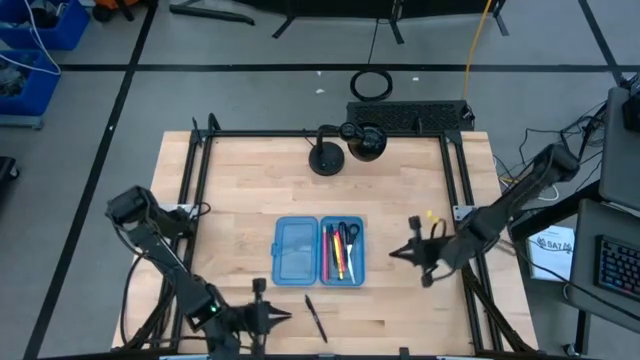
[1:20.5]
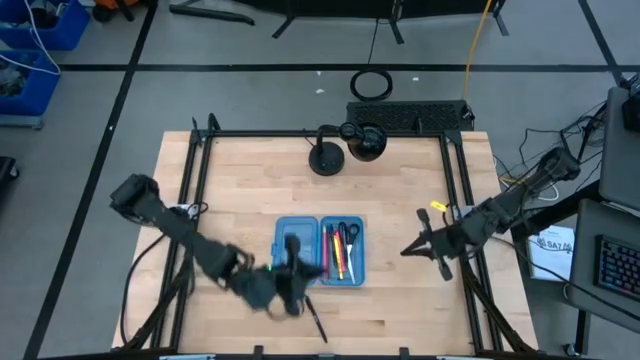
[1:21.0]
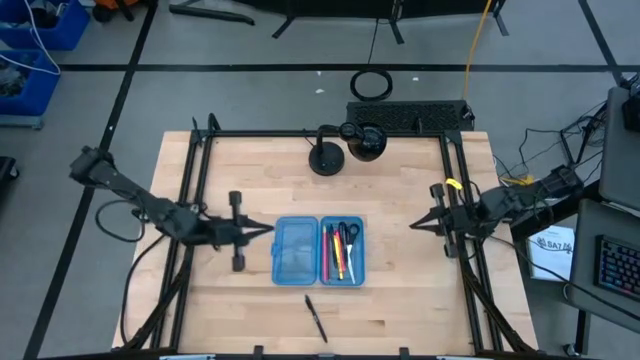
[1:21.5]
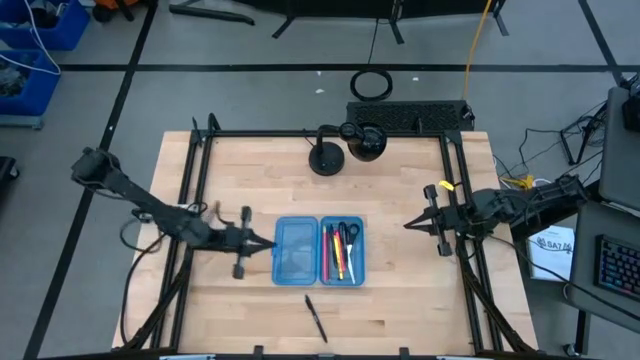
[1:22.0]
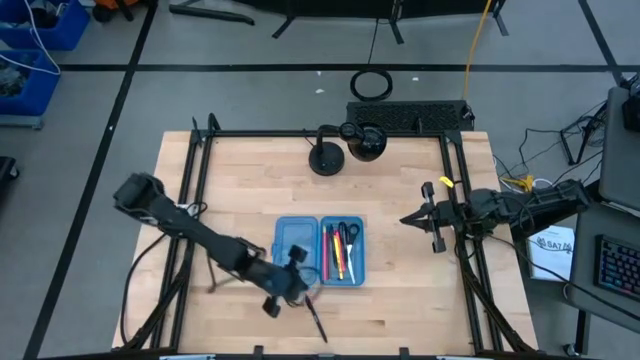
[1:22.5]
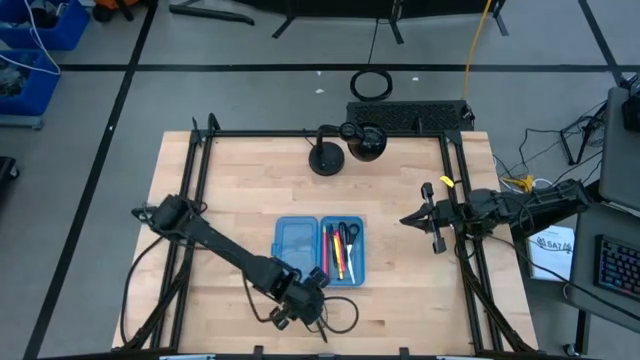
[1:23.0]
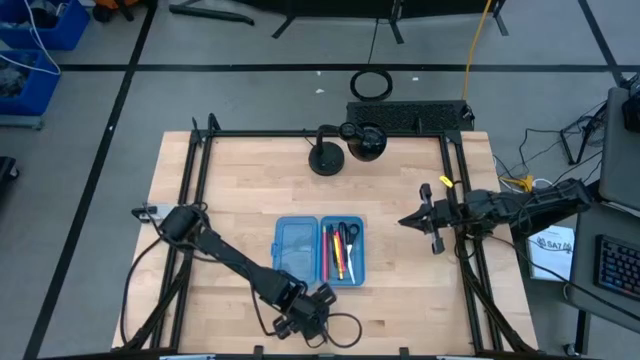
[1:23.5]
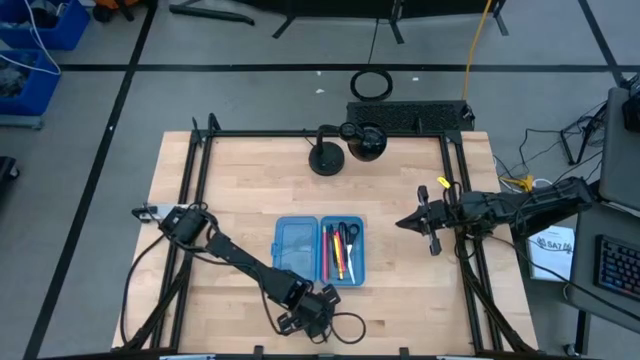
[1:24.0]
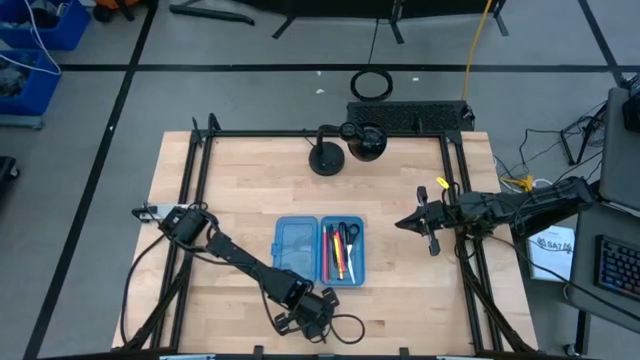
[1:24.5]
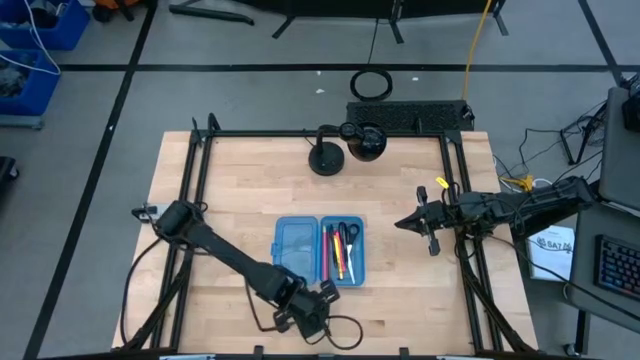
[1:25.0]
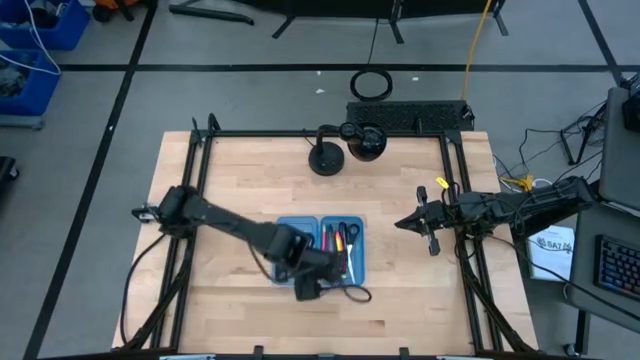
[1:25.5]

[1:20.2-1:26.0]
Task: Pick & place school supplies into a supply box
Put the black pen into the blue supply box

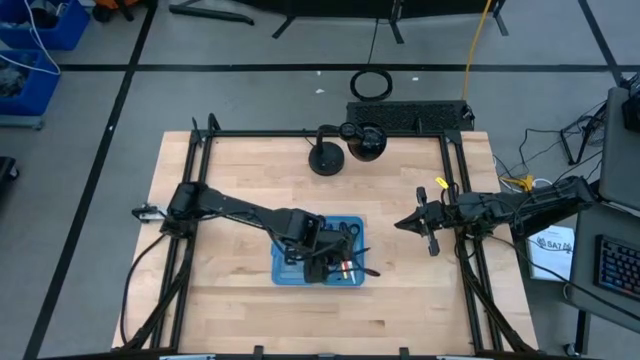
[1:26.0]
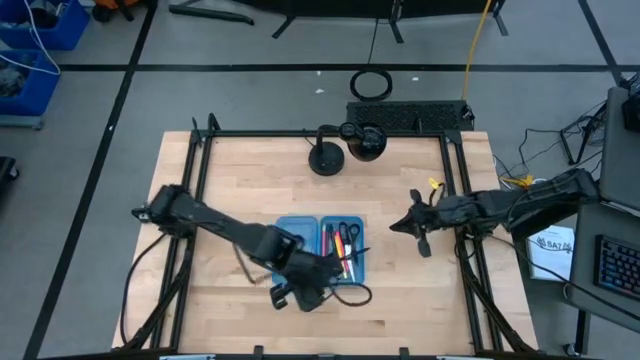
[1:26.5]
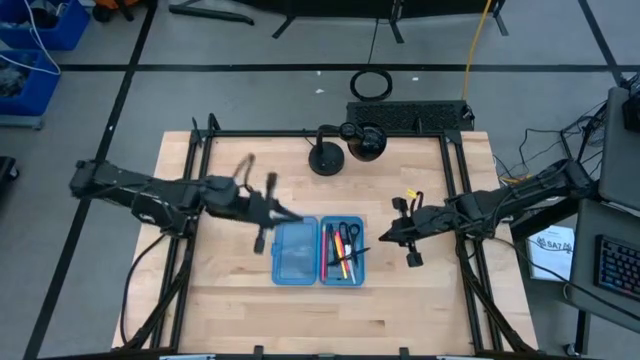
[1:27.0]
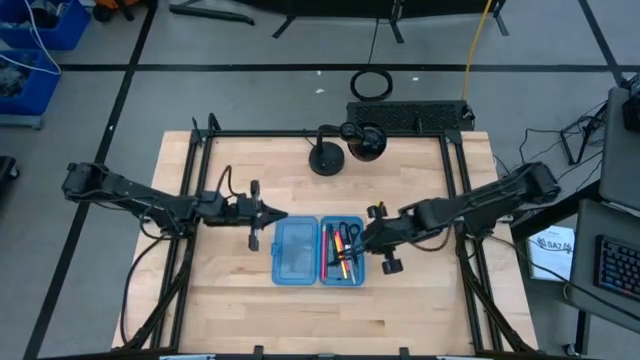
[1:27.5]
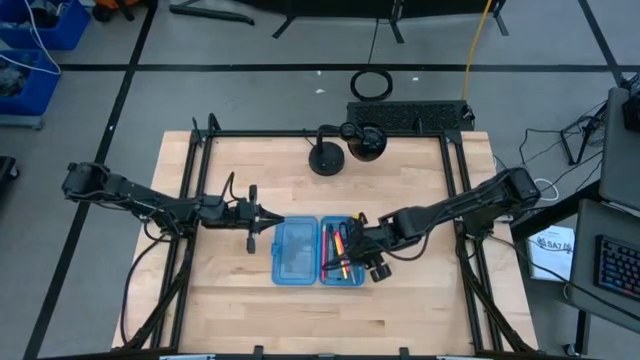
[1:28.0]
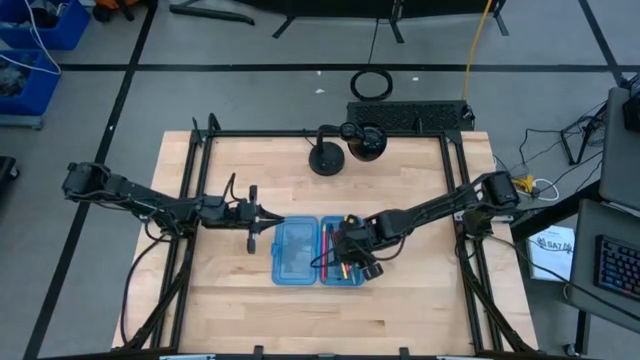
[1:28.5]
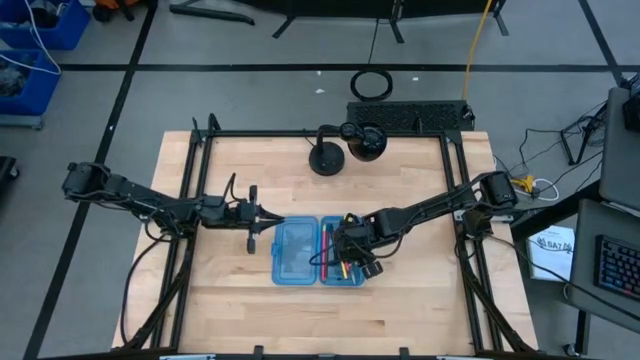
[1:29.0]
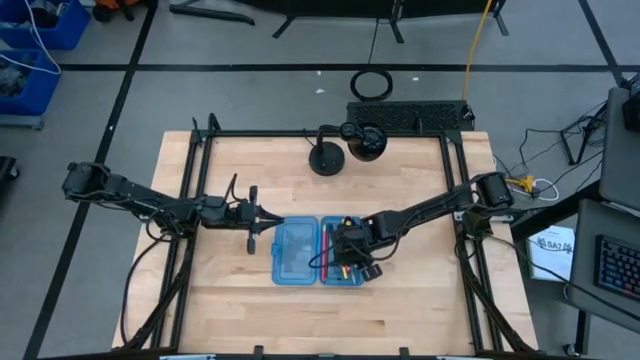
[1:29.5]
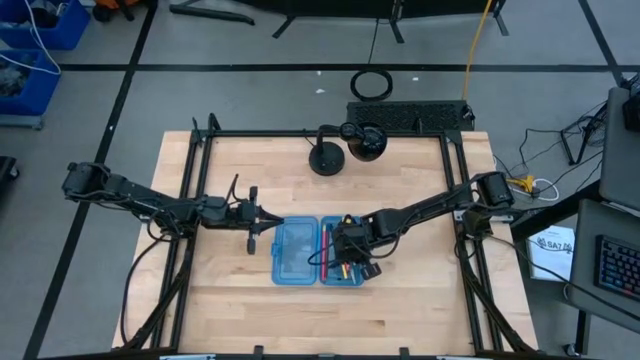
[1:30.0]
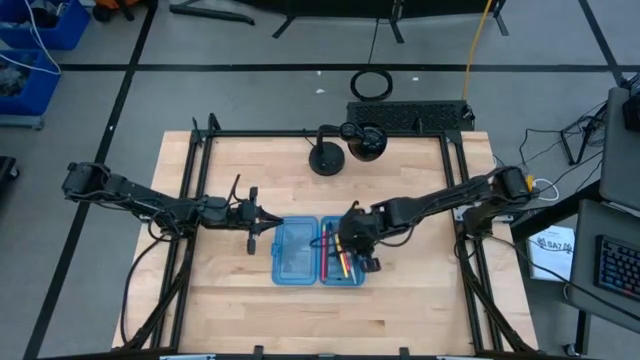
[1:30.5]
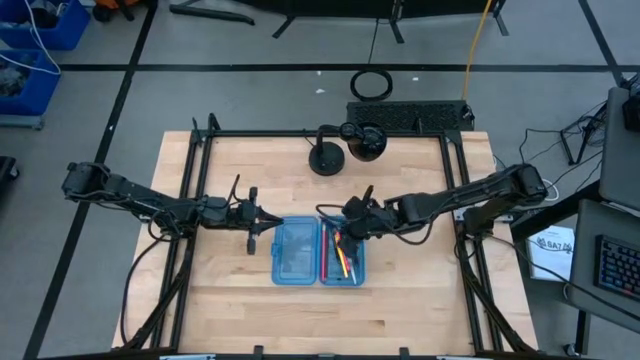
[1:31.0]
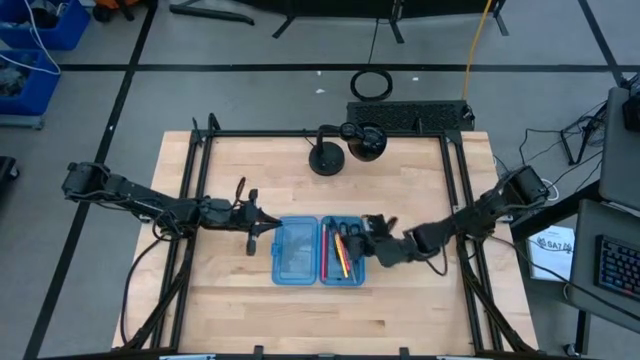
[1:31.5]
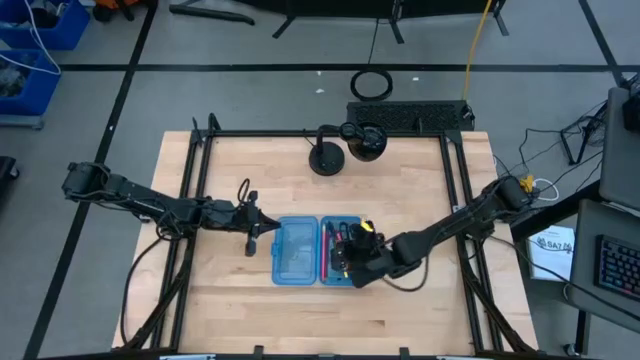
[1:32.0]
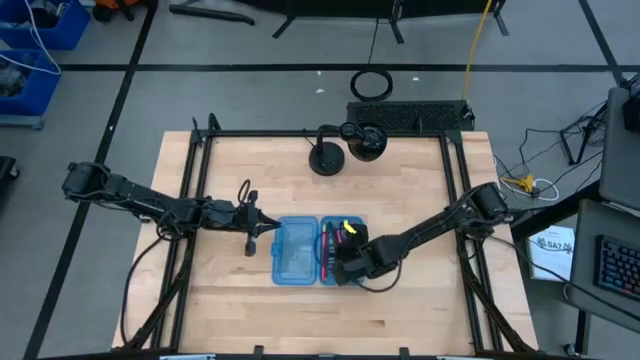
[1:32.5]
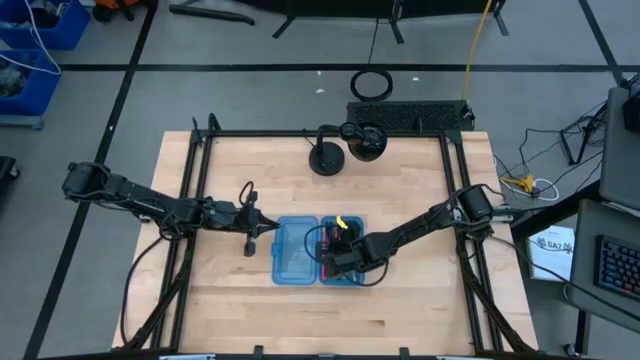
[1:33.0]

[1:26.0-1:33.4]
Put the black pen into the blue supply box

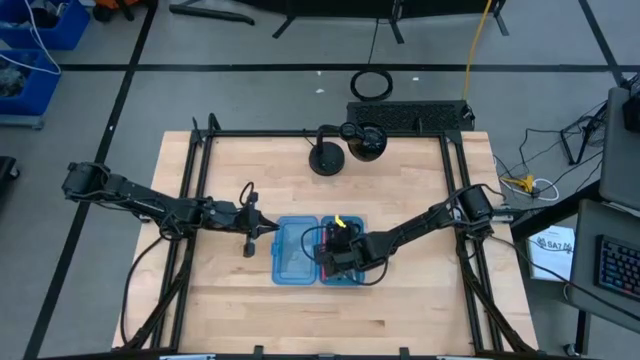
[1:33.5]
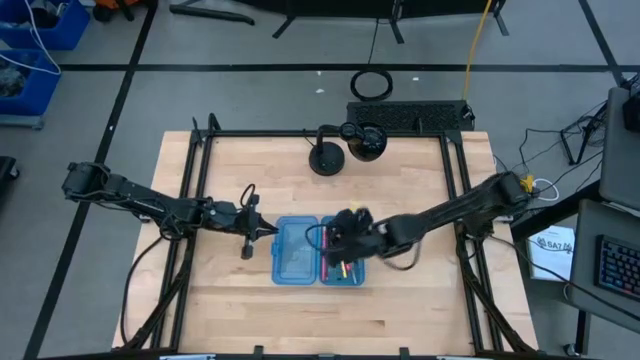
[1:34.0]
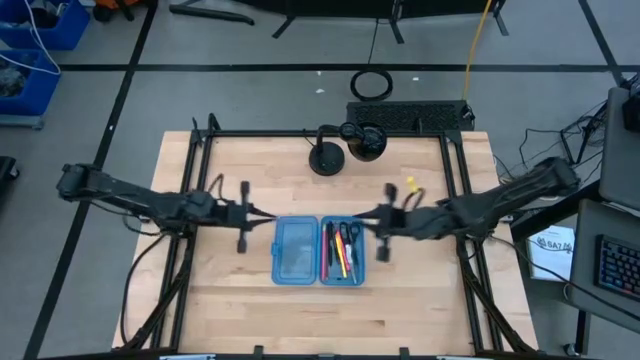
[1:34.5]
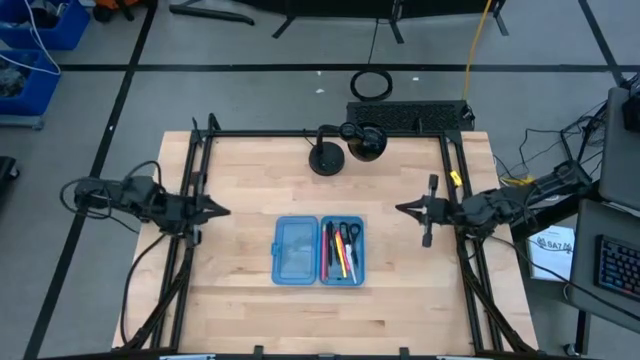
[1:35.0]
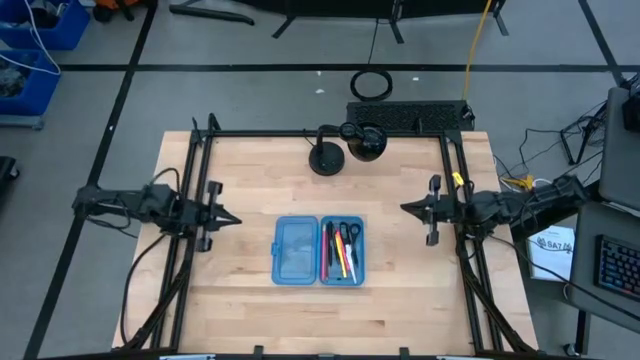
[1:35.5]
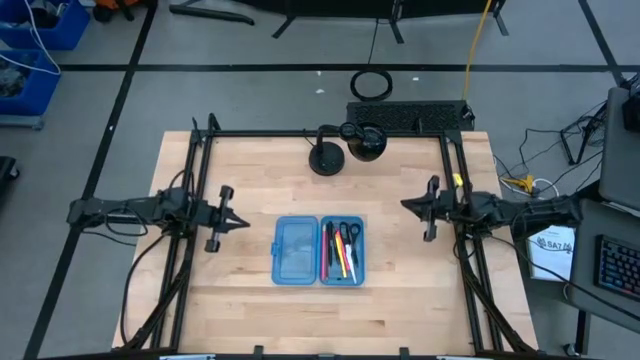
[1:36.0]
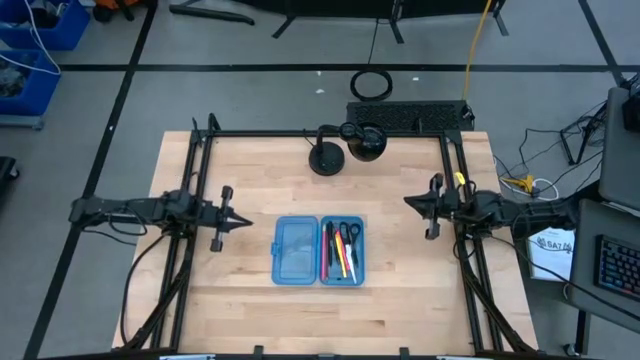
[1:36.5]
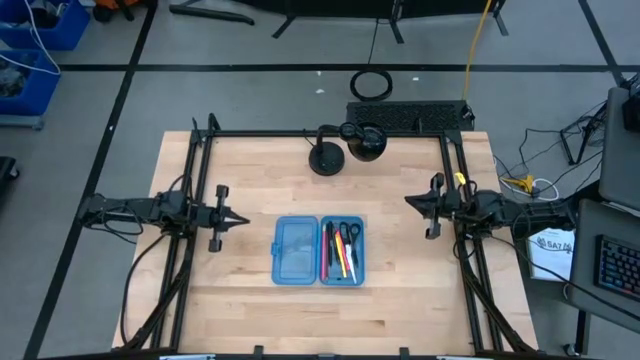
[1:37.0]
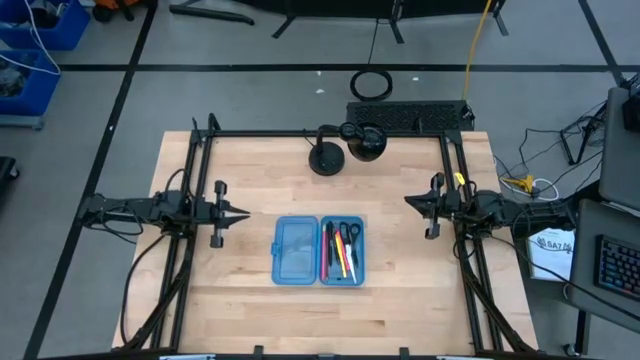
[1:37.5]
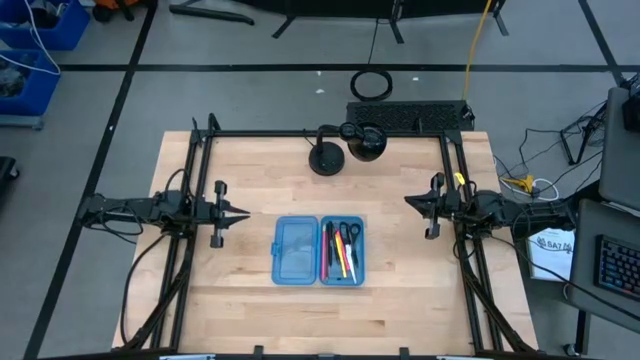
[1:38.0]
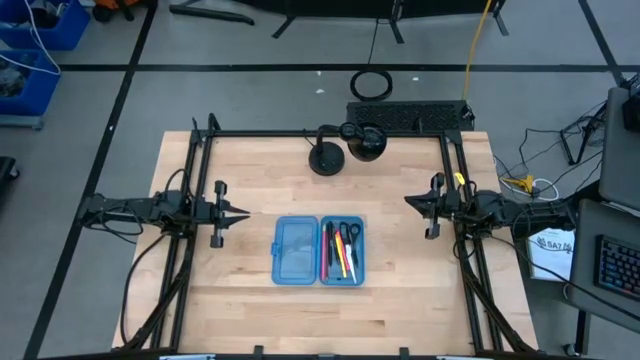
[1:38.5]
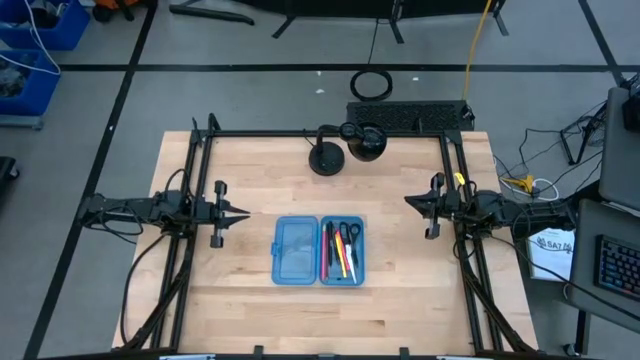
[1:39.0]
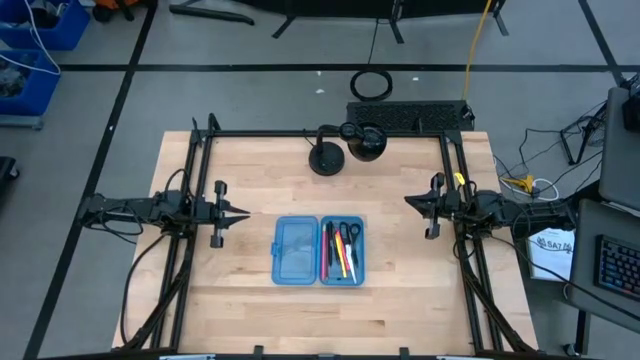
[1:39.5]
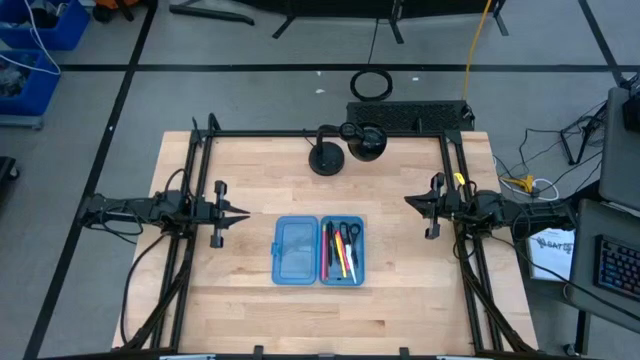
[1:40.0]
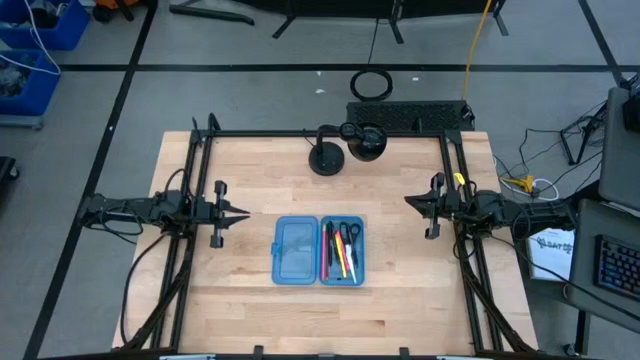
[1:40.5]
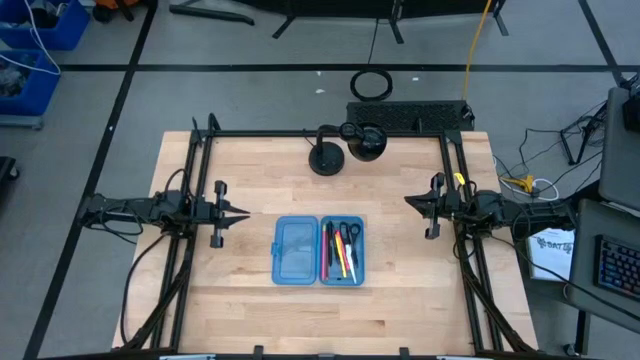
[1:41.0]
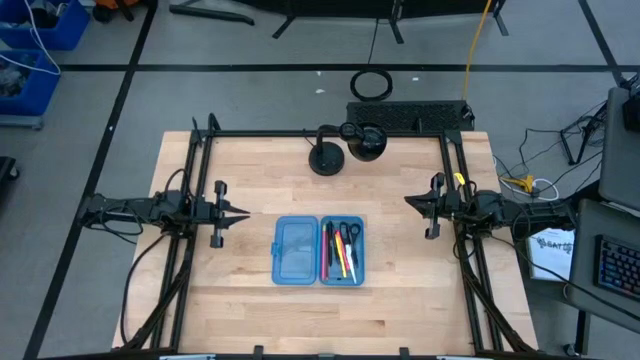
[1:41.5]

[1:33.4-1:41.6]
Return to Home Position
